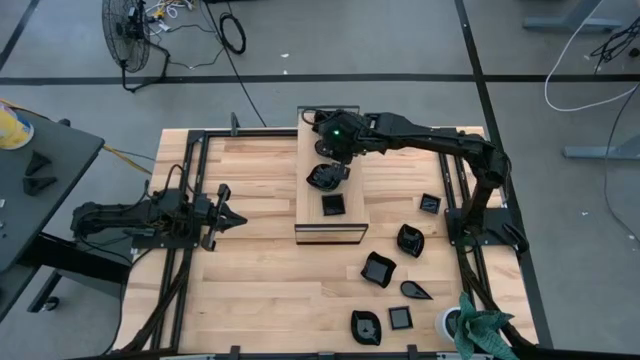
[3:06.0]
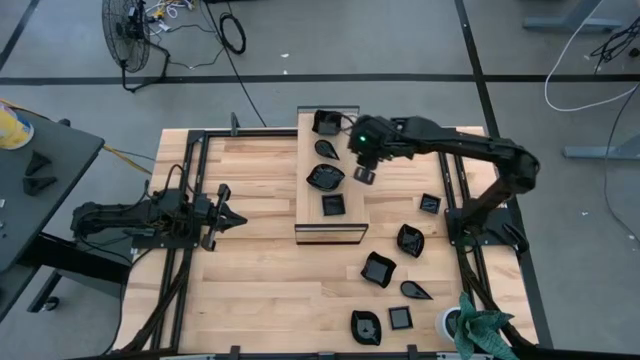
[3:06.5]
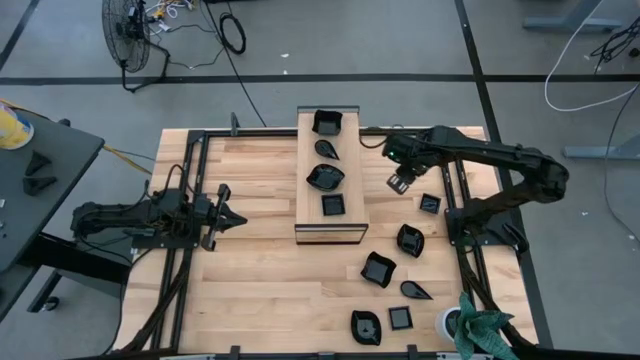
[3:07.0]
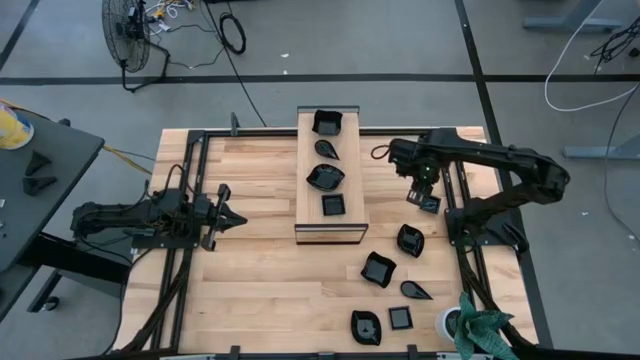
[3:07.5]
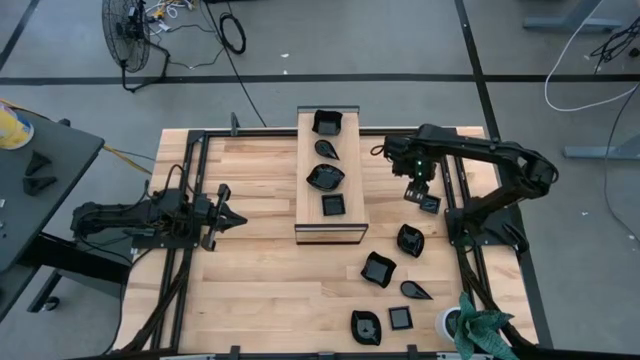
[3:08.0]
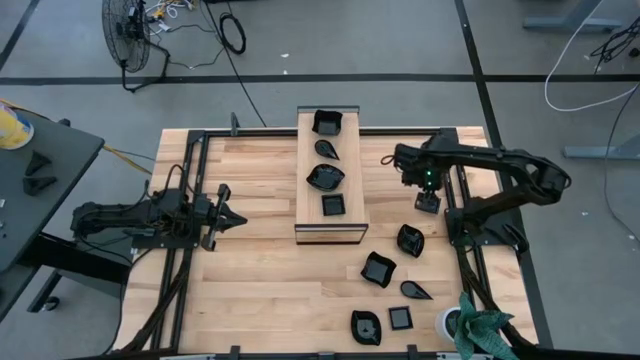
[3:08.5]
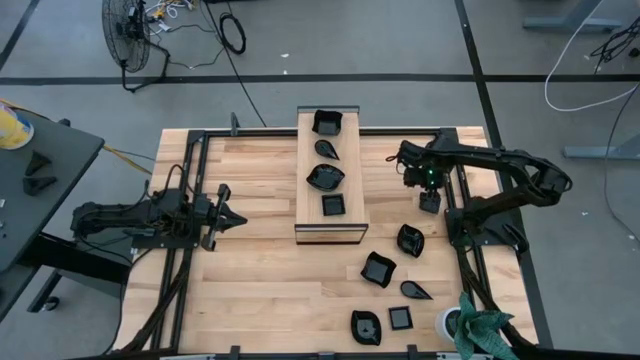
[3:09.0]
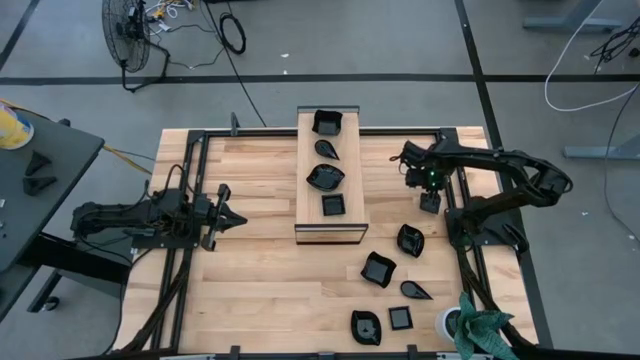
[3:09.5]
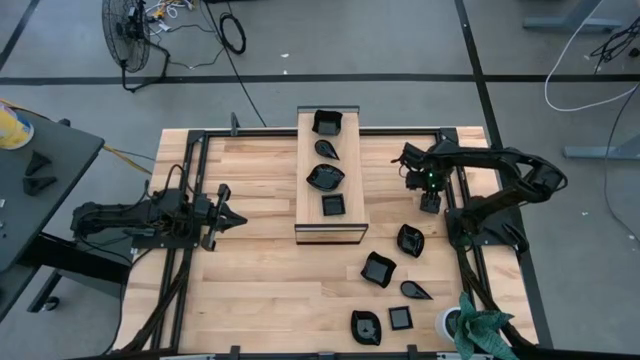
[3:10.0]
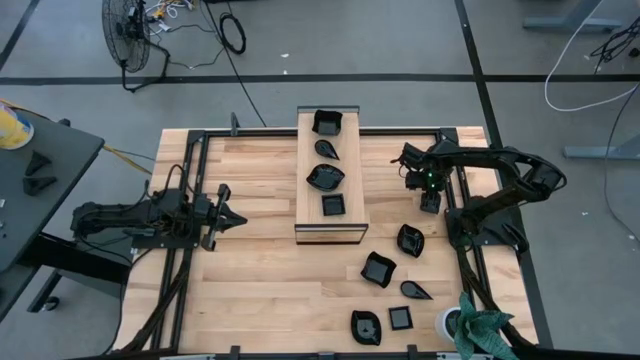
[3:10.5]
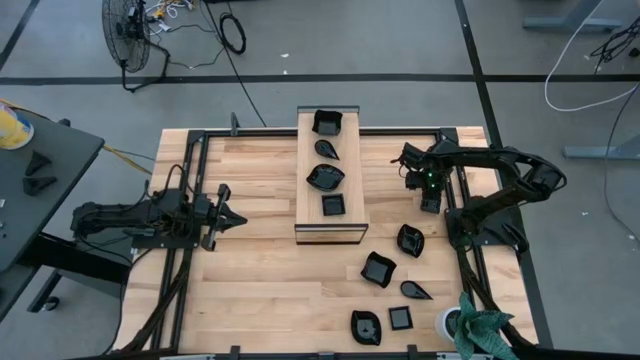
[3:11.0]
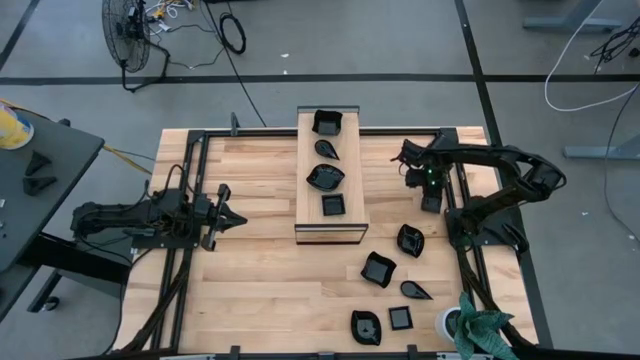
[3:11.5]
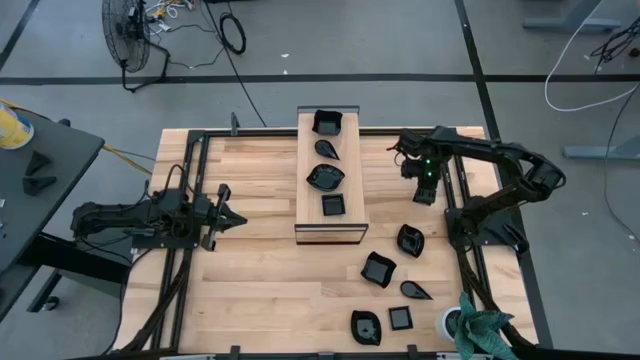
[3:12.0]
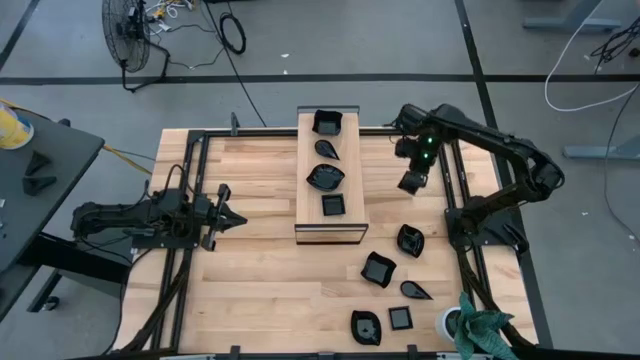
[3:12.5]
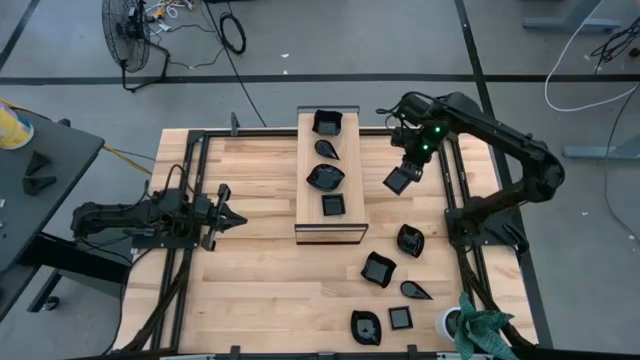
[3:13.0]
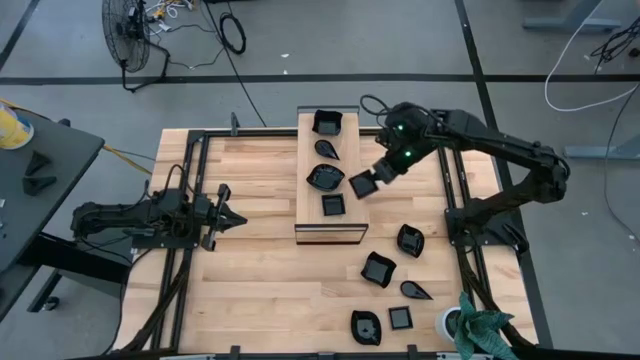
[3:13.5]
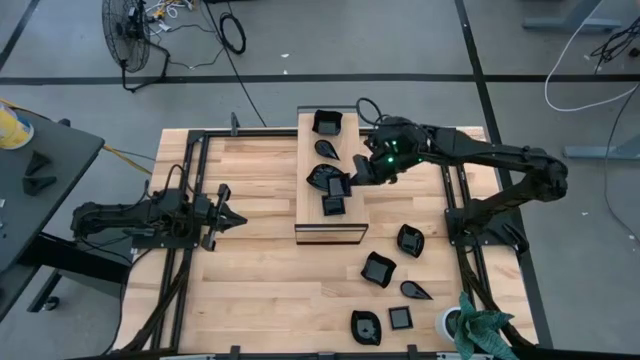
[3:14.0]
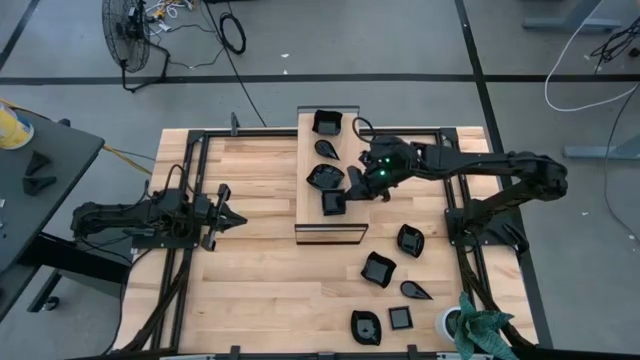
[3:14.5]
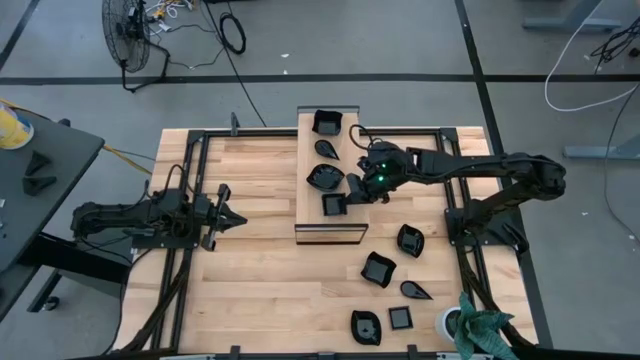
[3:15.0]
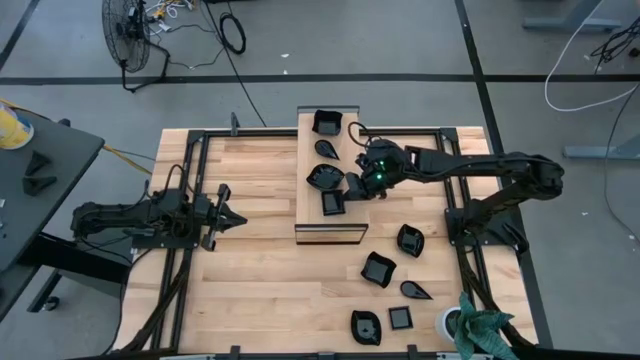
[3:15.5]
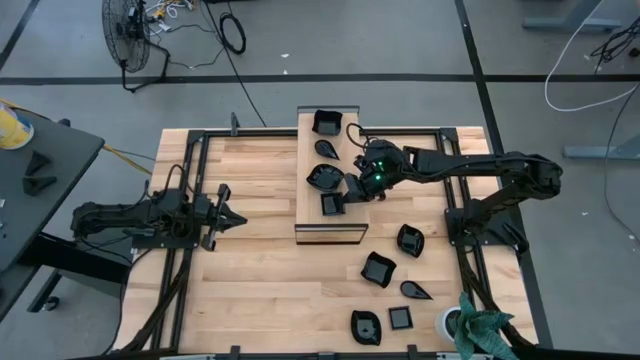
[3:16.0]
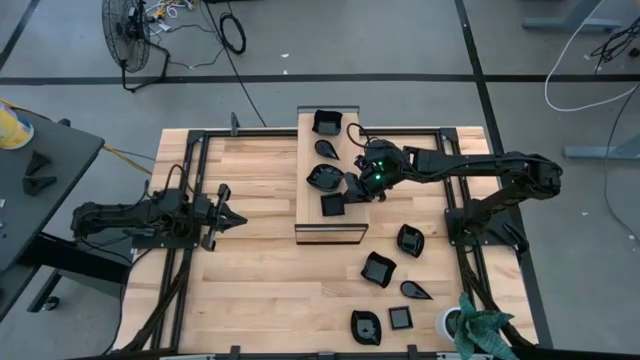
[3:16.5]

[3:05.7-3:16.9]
Task: Pick & Place Mini shaped plates
Stack the square plate on top of the square plate on the shelf

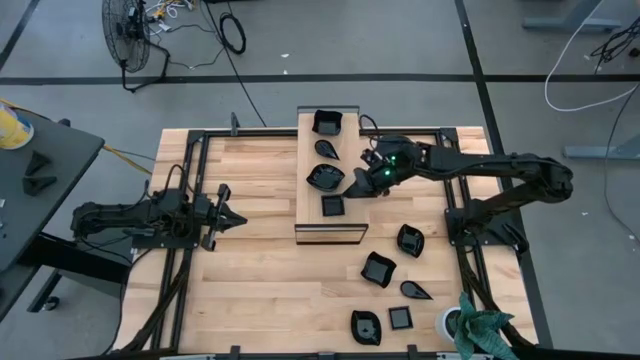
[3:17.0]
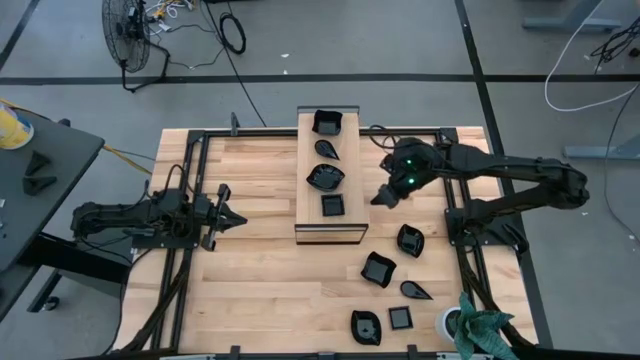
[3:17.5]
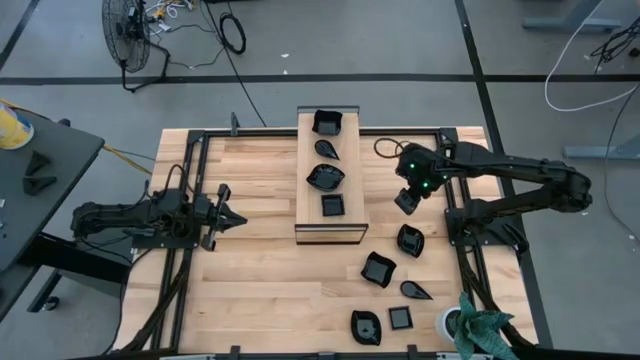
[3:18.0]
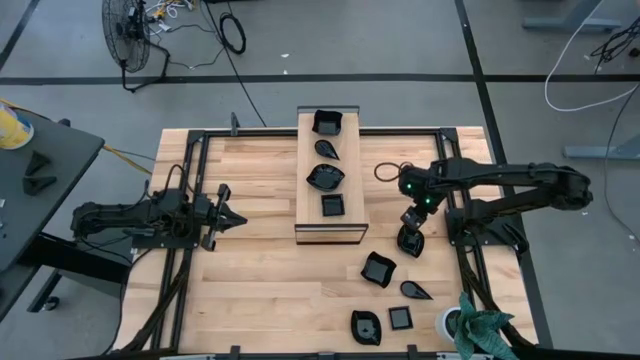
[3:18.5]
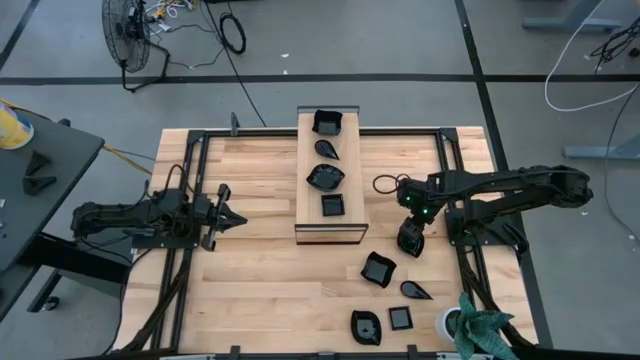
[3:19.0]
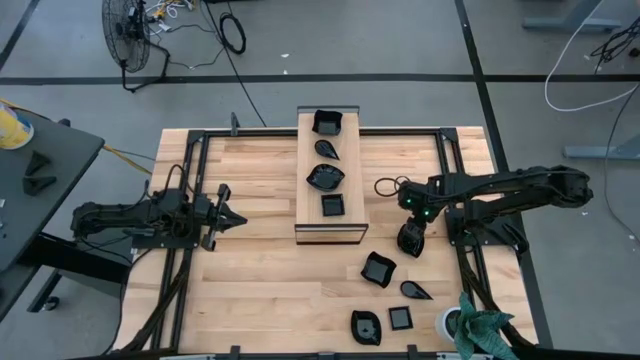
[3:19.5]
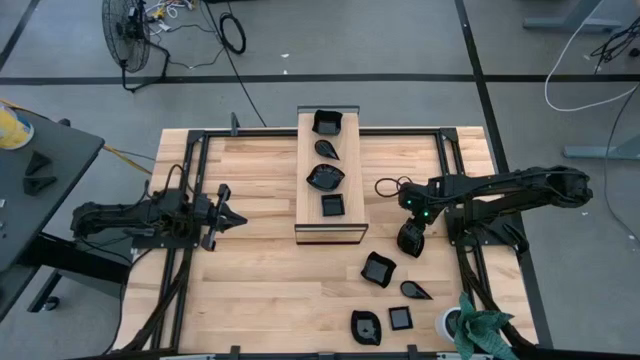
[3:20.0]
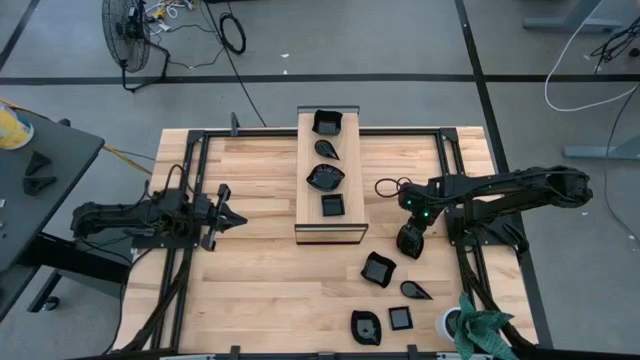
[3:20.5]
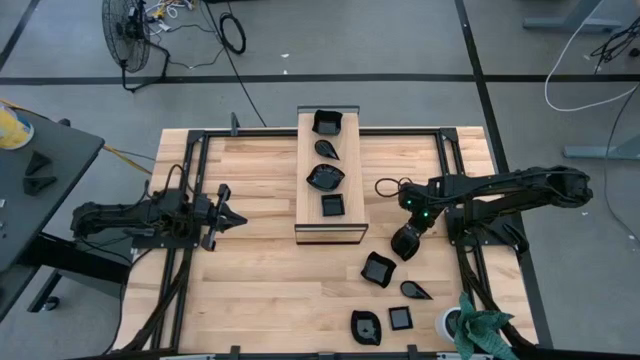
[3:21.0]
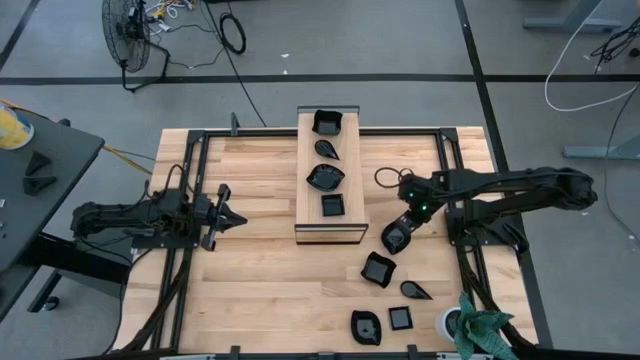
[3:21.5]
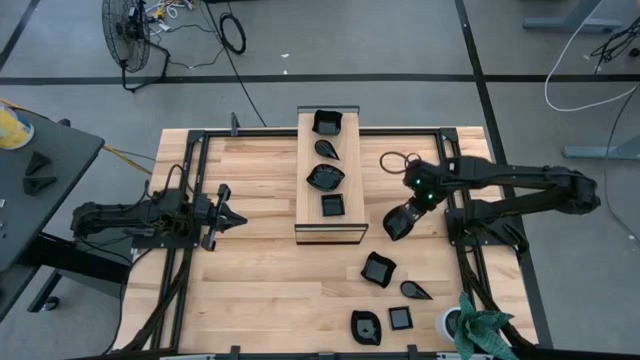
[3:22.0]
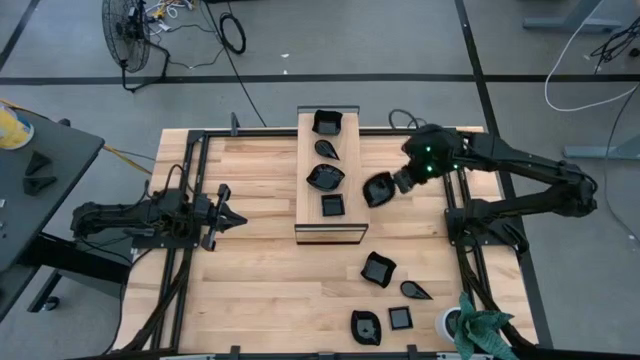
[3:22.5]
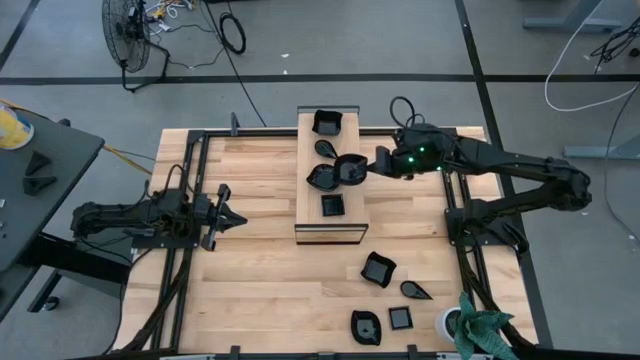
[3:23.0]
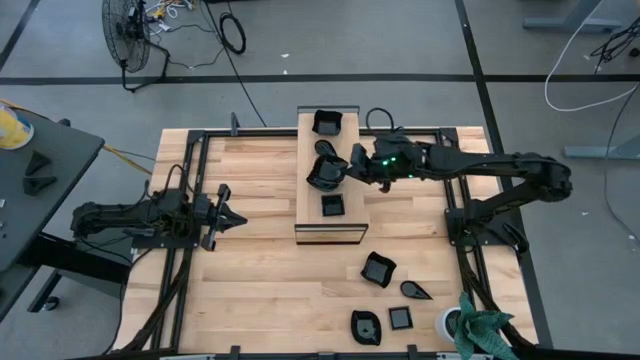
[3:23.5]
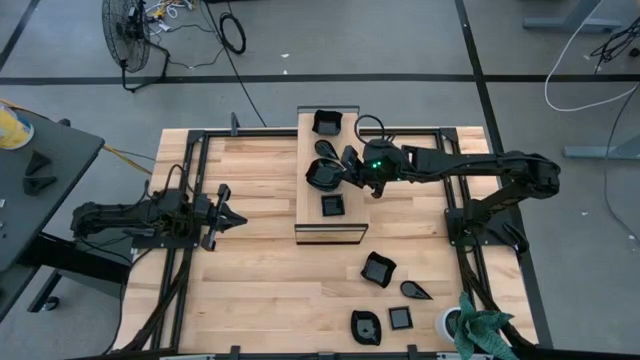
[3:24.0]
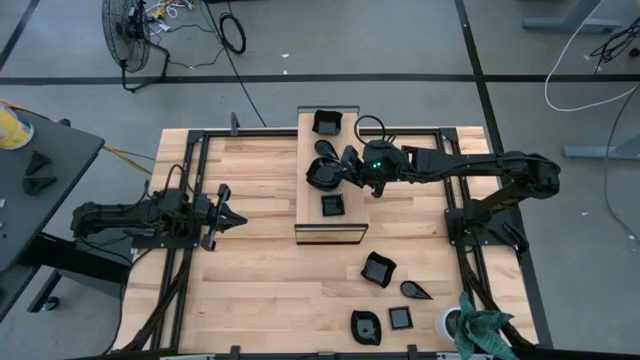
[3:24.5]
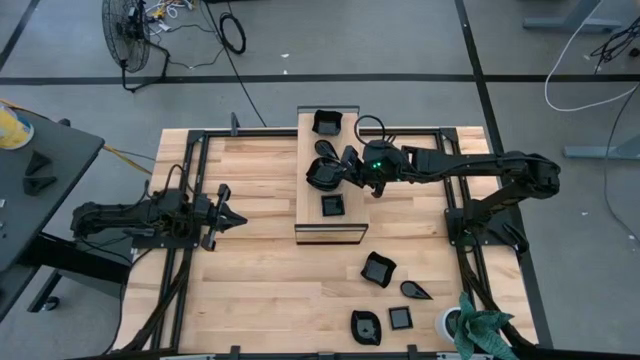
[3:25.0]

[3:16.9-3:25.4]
Stack the leaf-shaped plate on top of the leaf-shaped plate on the shelf

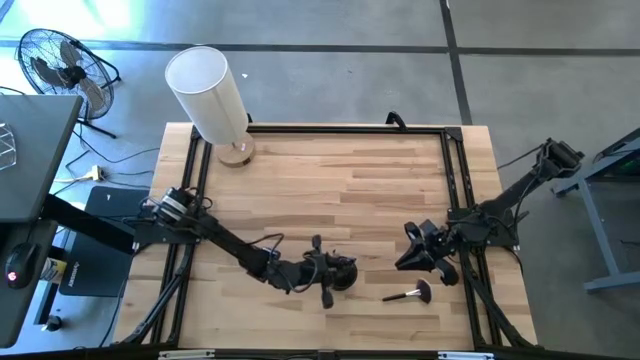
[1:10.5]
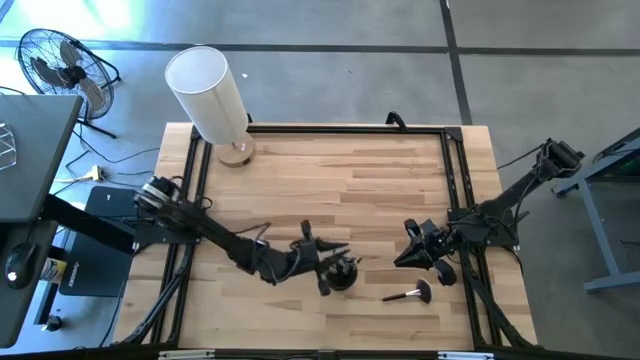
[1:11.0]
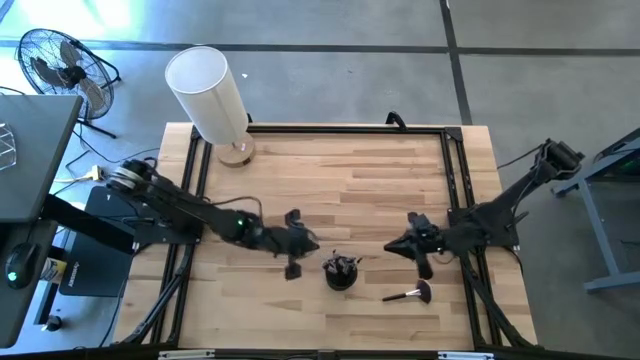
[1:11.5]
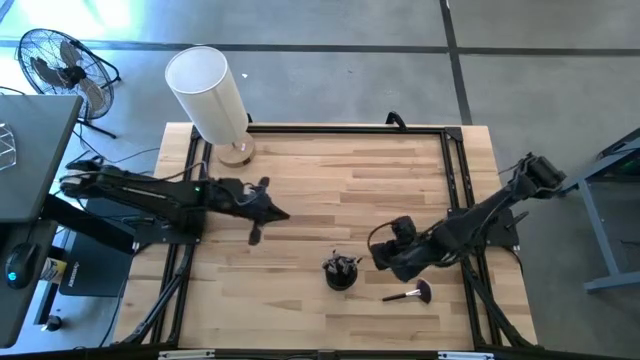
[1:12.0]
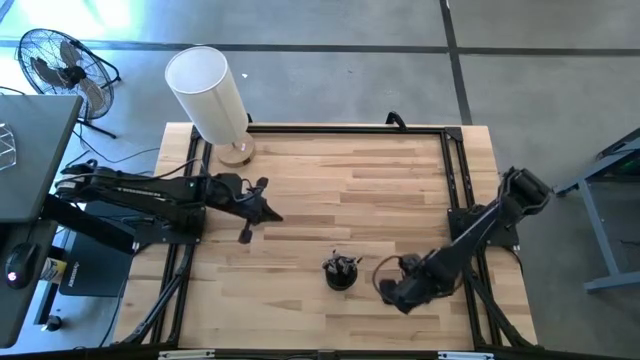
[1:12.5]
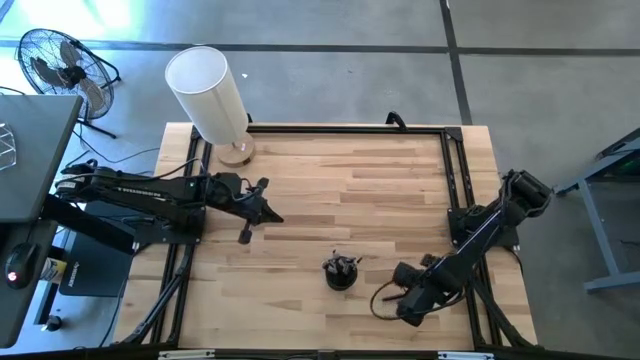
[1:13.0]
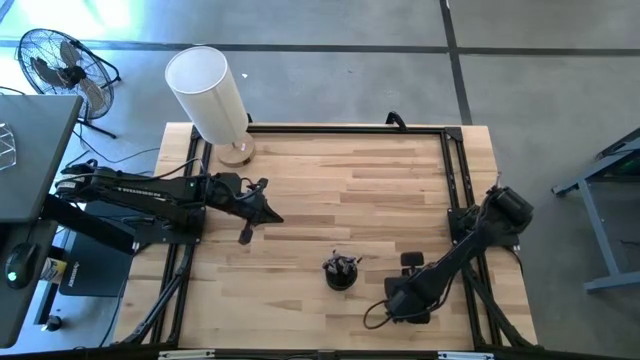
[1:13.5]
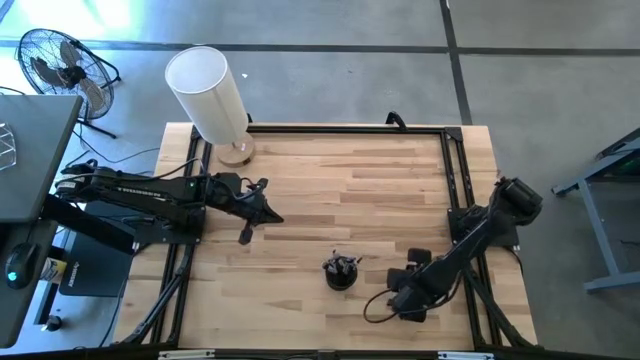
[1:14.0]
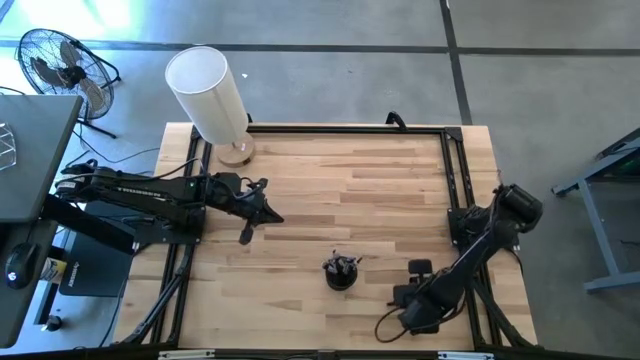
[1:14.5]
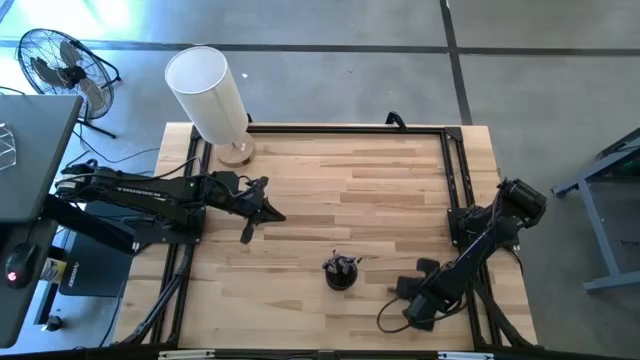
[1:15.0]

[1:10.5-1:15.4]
Task: Pick & Place Makeup Supplies
Put the makeup brush into the black makeup holder
